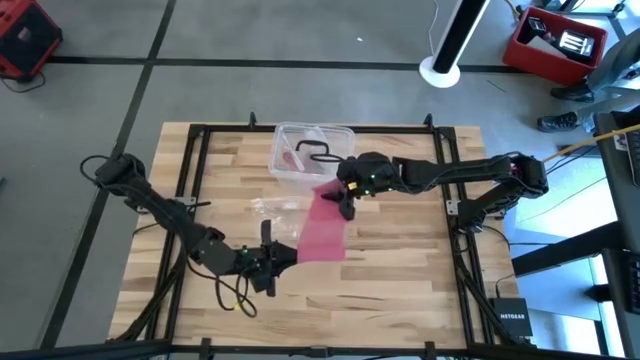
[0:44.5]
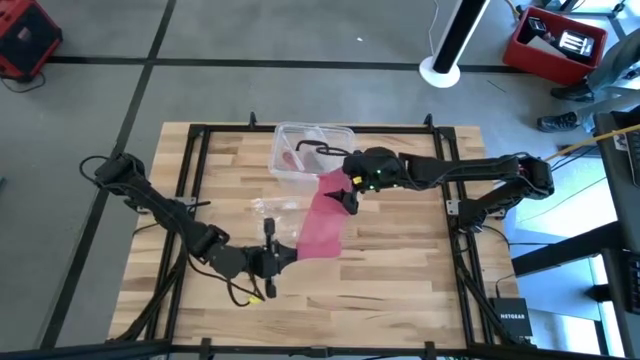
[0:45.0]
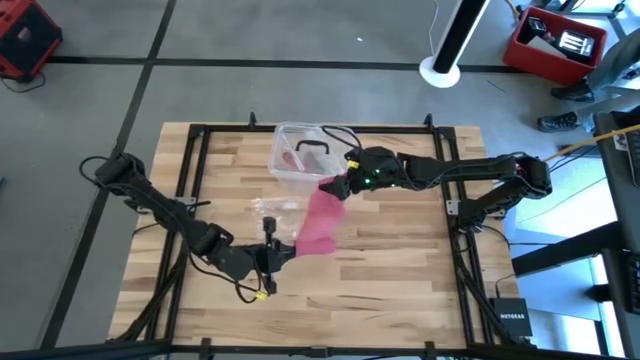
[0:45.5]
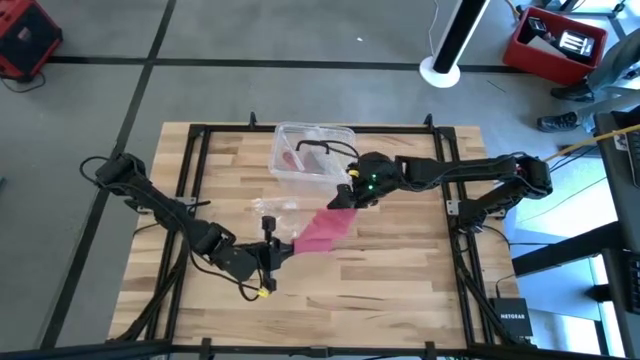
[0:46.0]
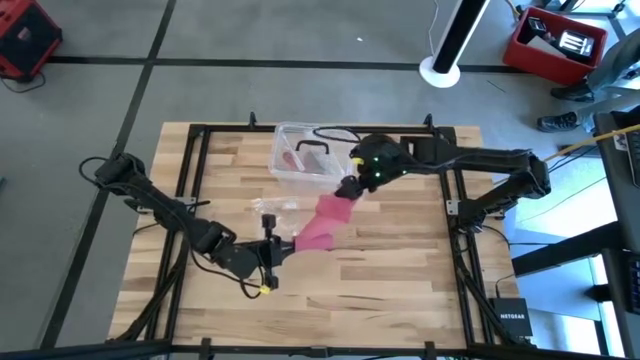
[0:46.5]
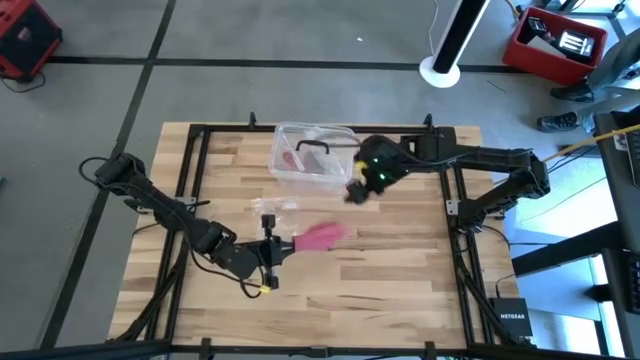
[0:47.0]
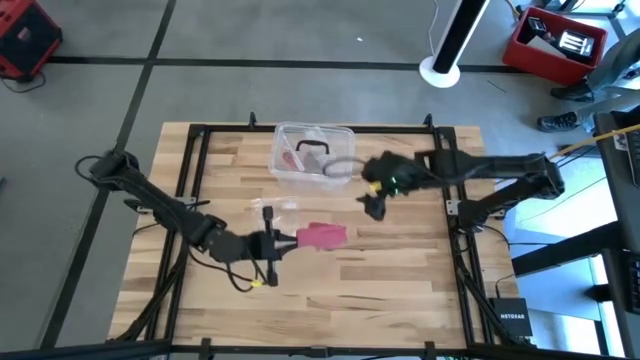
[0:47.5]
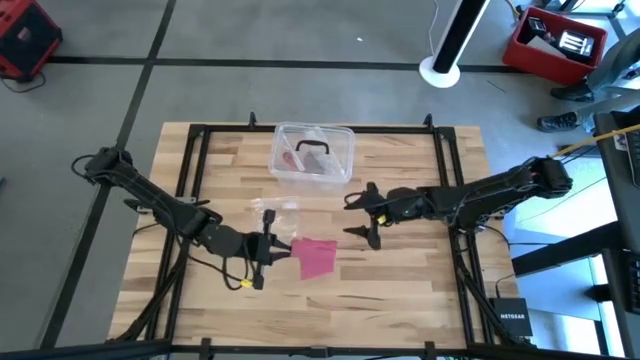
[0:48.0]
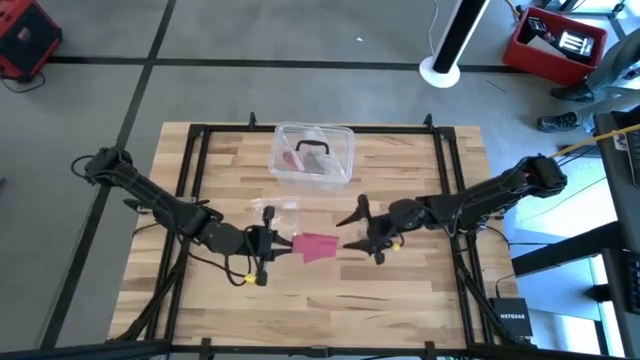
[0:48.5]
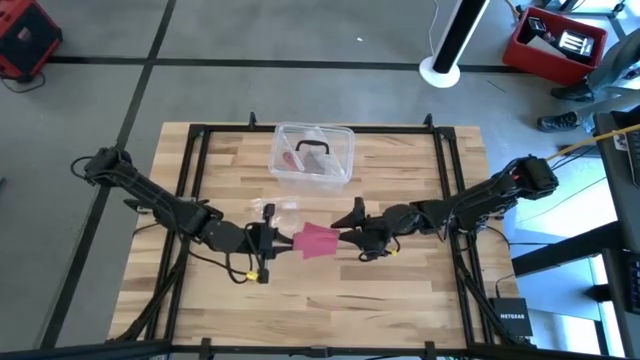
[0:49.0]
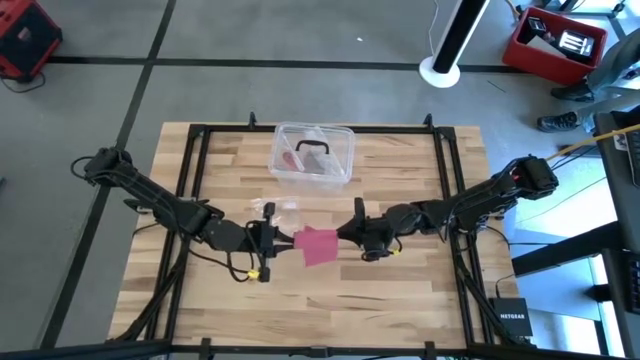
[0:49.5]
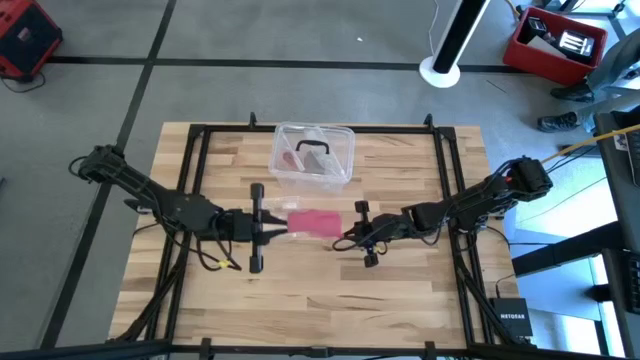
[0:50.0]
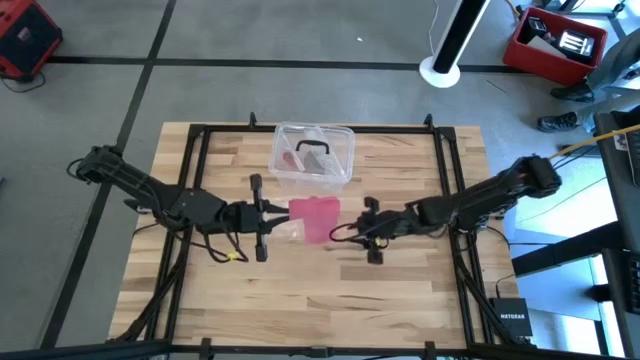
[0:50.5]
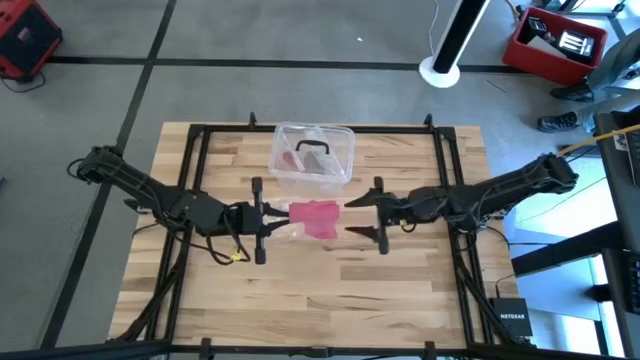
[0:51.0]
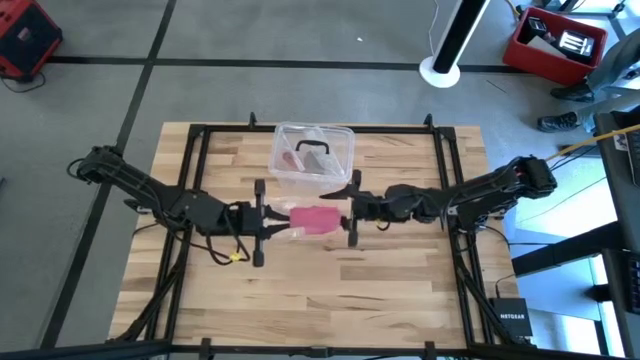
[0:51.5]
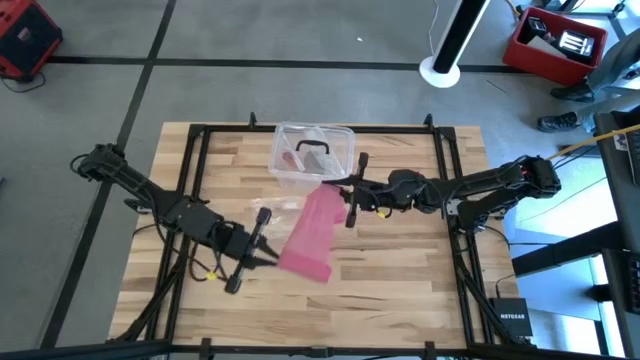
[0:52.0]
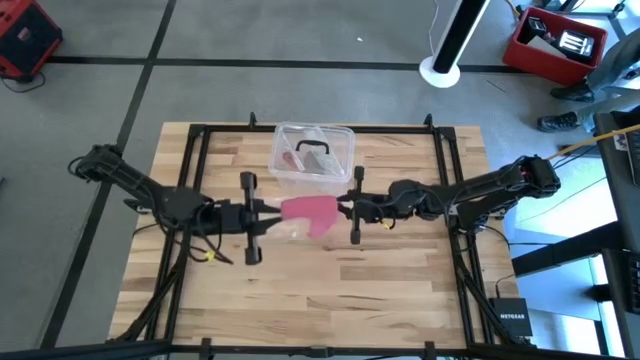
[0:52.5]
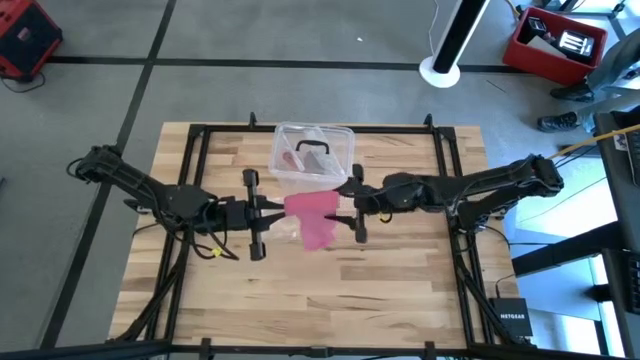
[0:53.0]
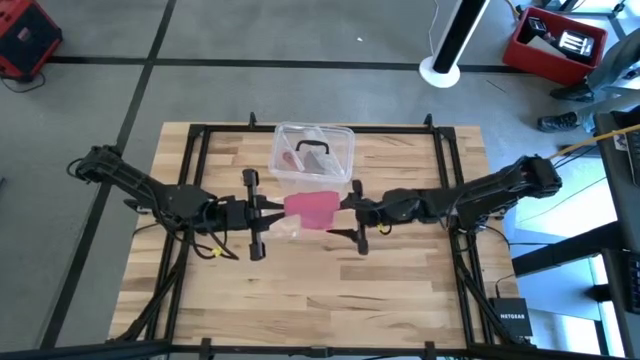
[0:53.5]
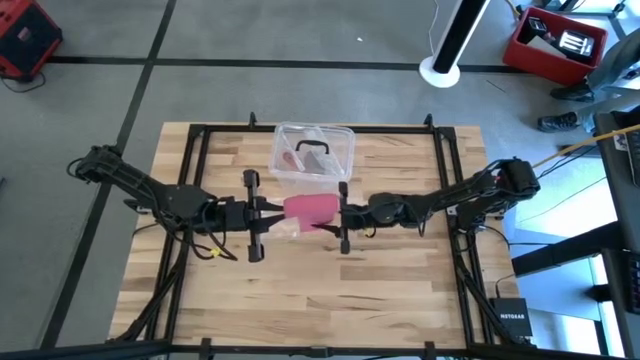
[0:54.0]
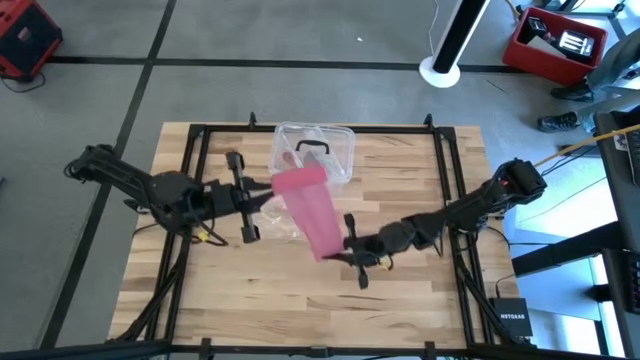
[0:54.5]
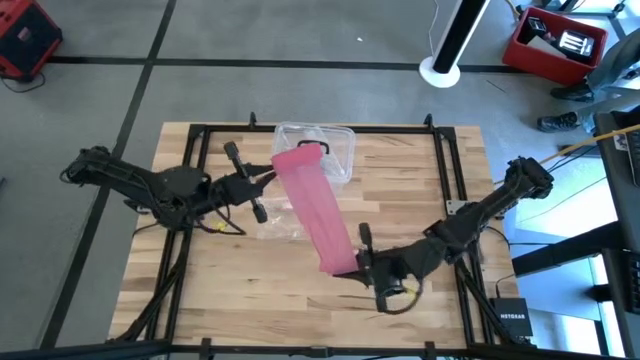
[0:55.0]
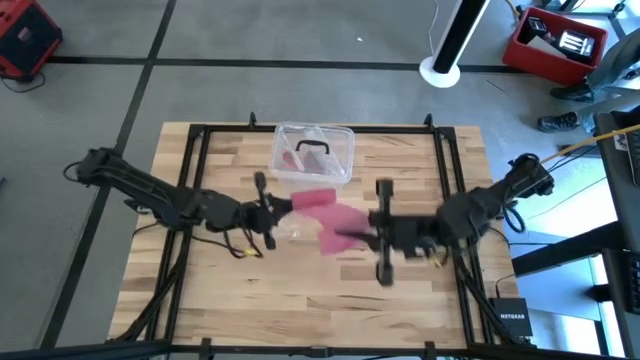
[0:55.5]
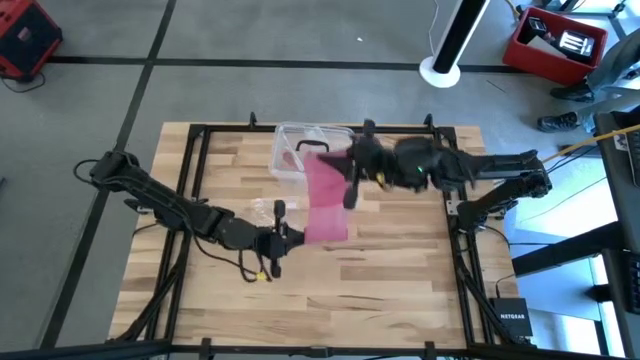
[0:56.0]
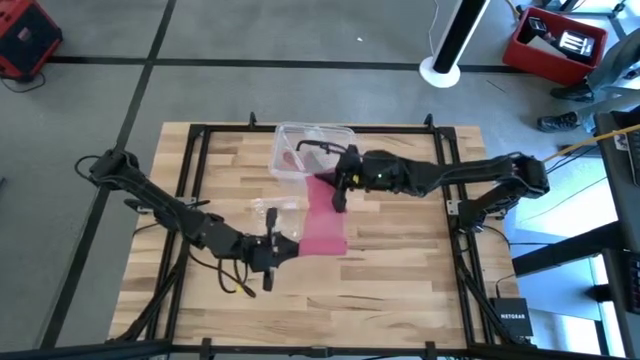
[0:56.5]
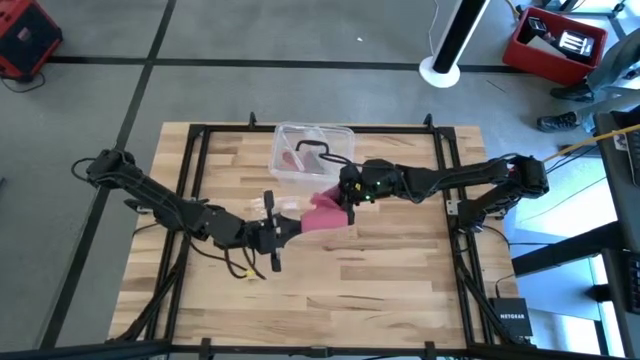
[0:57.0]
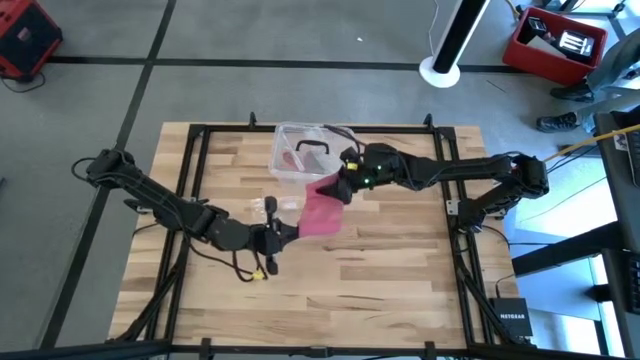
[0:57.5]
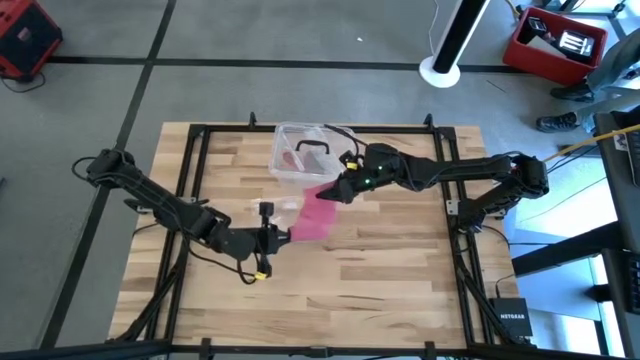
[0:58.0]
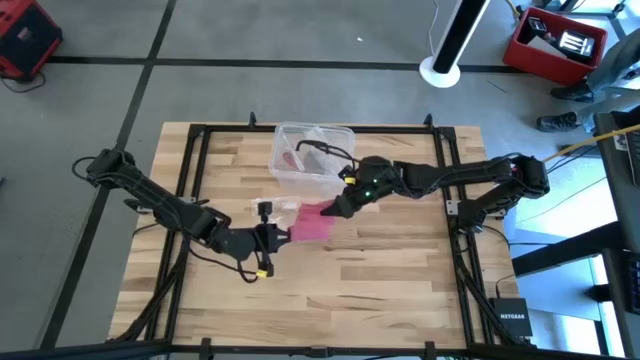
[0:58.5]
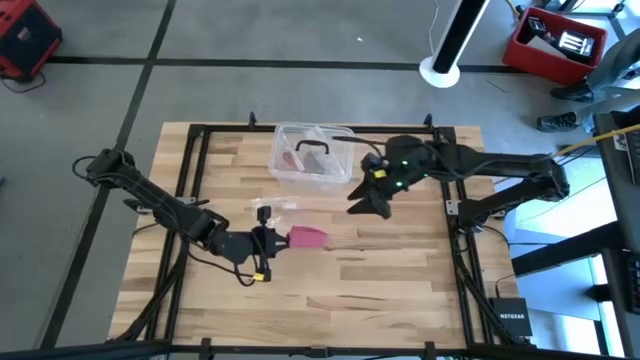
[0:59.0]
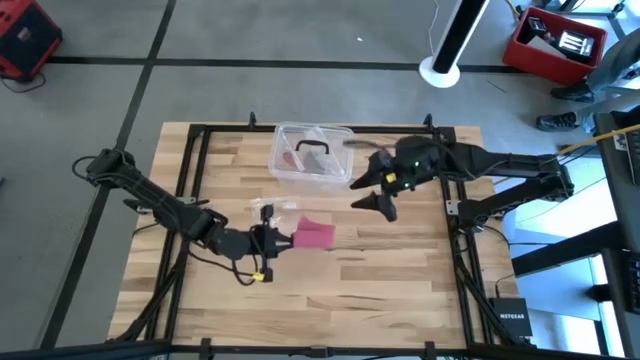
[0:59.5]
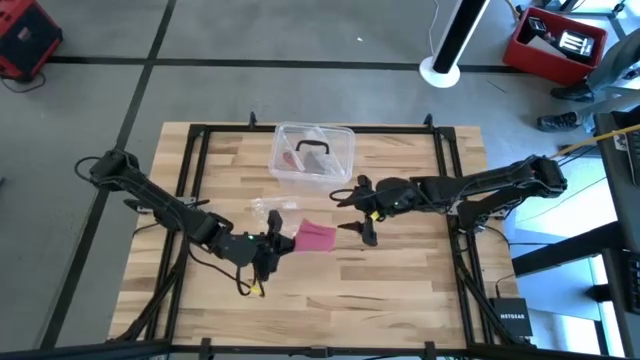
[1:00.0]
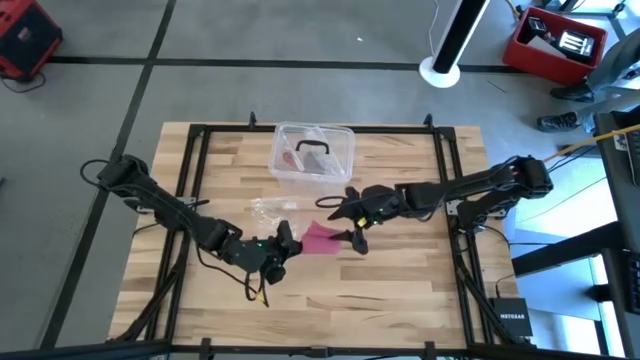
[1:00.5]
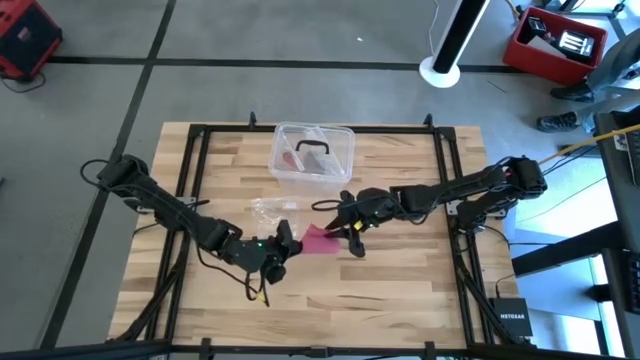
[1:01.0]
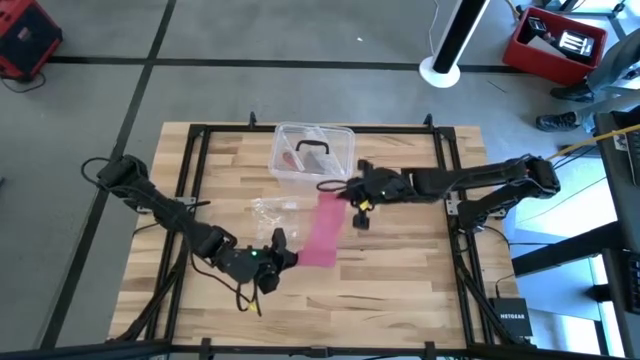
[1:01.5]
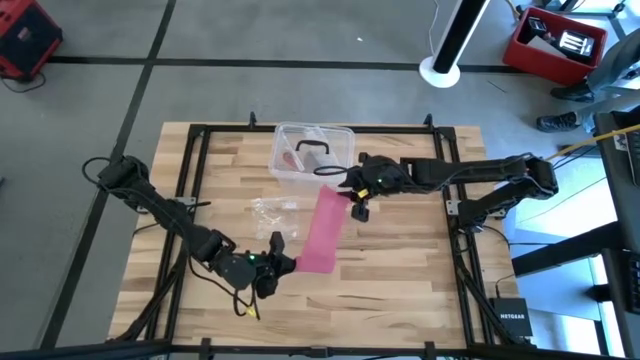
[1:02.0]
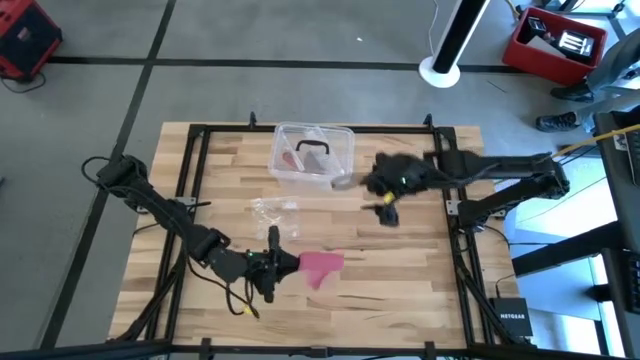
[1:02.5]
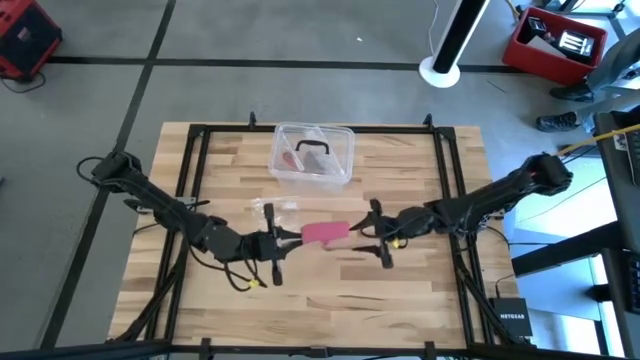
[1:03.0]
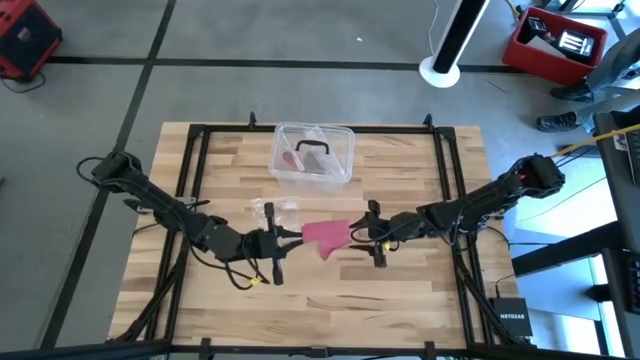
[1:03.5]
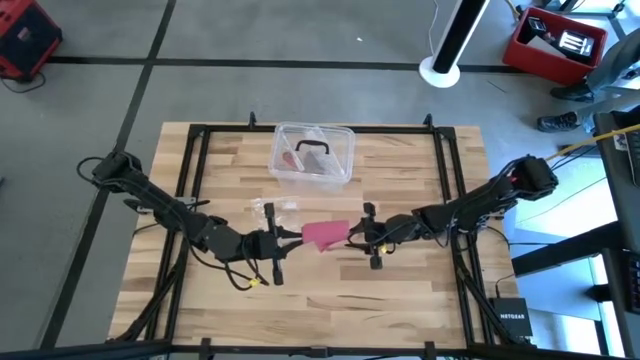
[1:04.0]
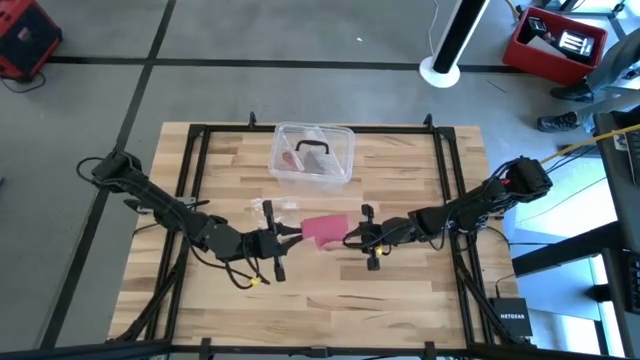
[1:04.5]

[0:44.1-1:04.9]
Task: Roll bandage
Roll the pink bandage

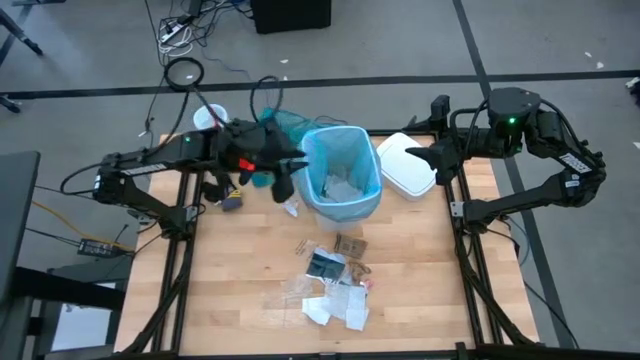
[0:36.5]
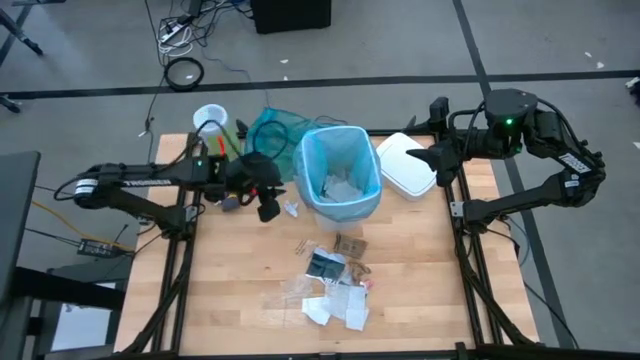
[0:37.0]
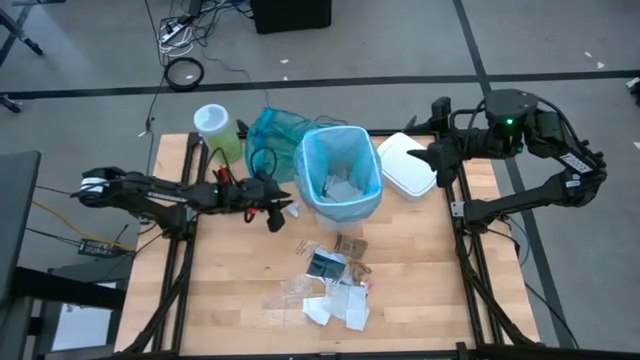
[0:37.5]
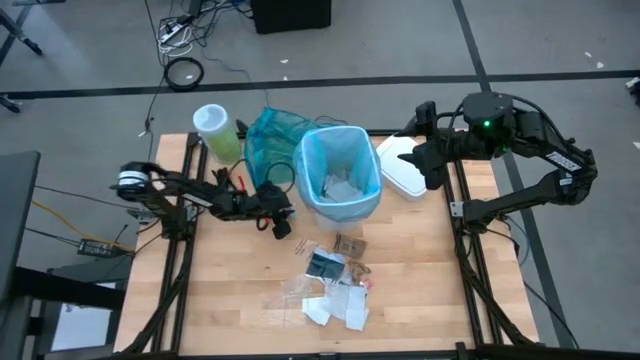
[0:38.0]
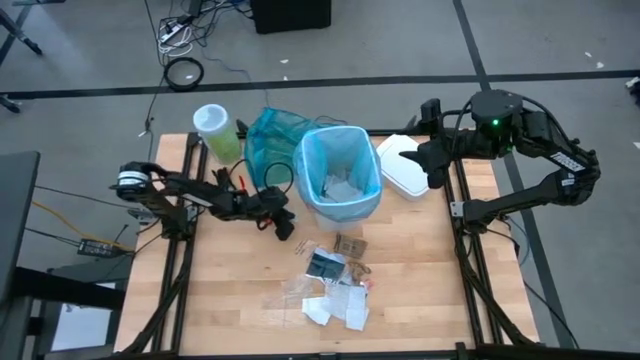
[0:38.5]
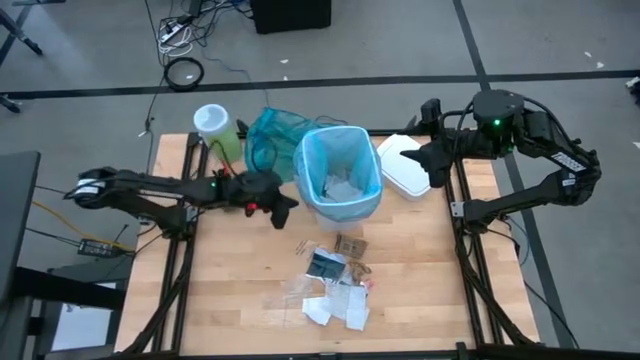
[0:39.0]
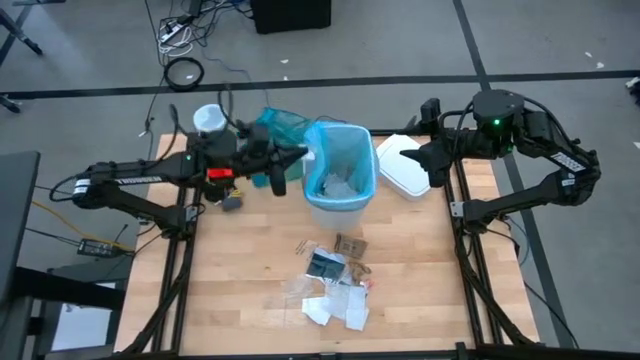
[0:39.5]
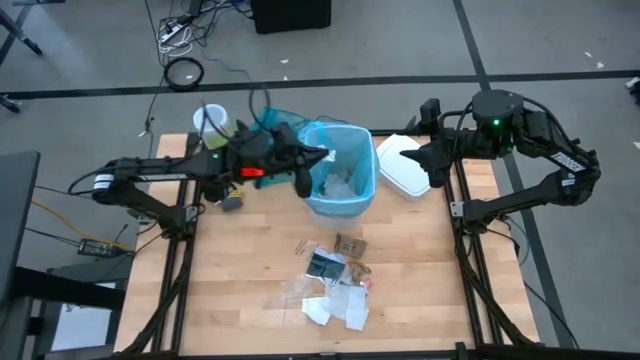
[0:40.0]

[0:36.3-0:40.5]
Task: place trash/remove bag and relplace
Put the white paper into the white trash bin
